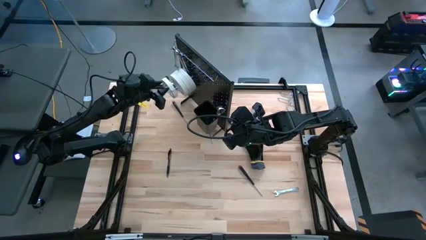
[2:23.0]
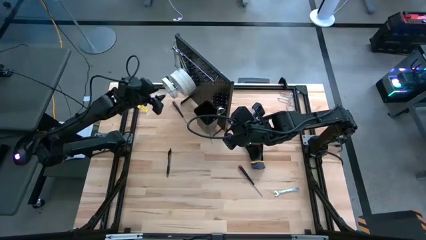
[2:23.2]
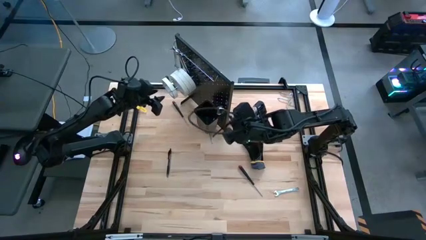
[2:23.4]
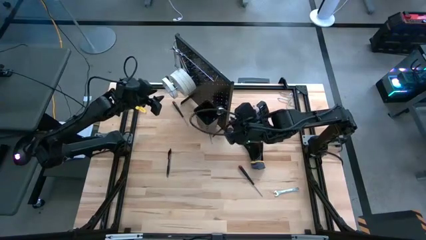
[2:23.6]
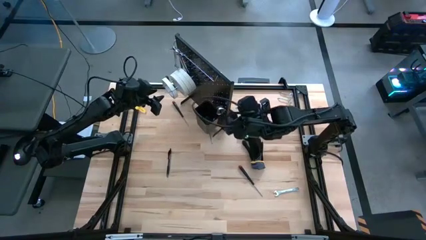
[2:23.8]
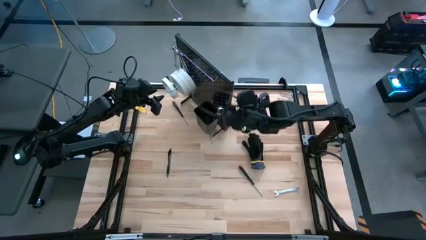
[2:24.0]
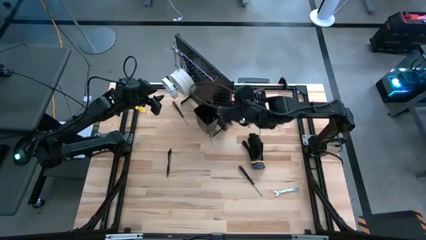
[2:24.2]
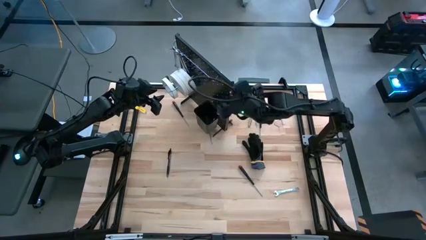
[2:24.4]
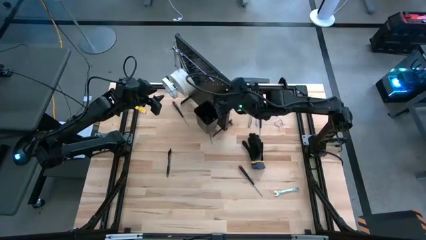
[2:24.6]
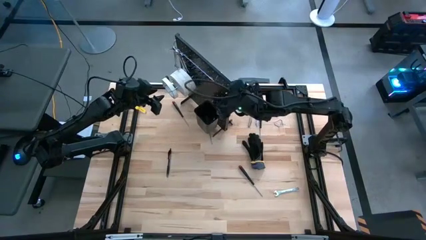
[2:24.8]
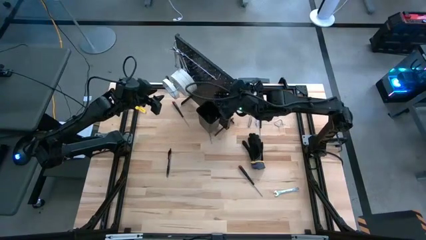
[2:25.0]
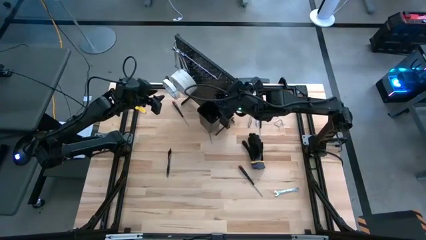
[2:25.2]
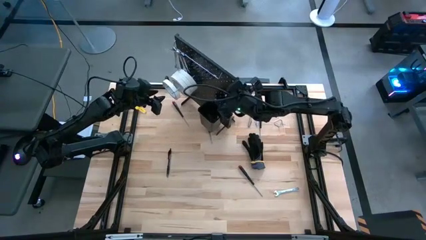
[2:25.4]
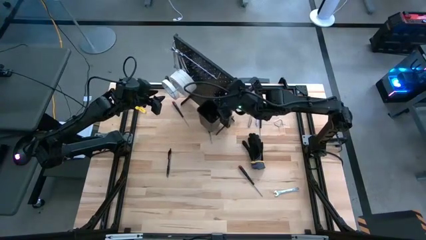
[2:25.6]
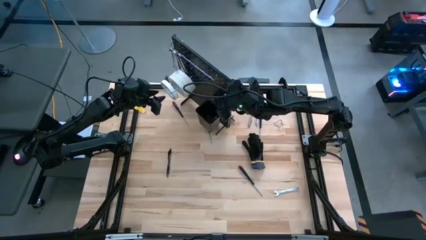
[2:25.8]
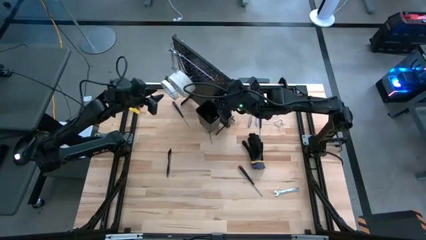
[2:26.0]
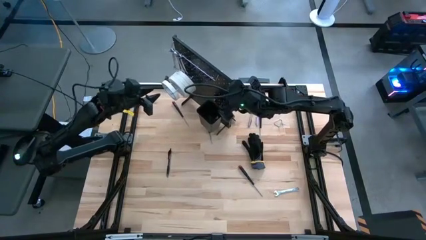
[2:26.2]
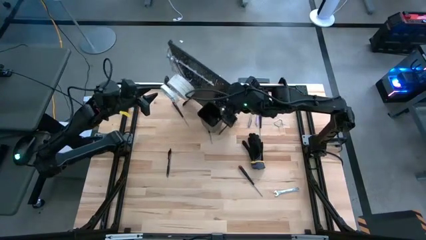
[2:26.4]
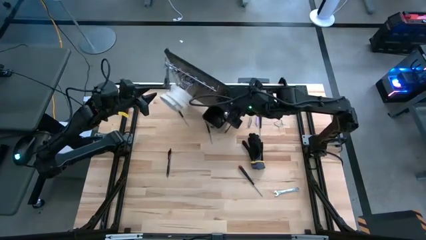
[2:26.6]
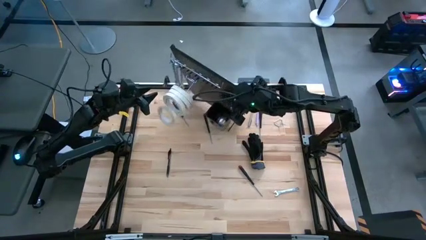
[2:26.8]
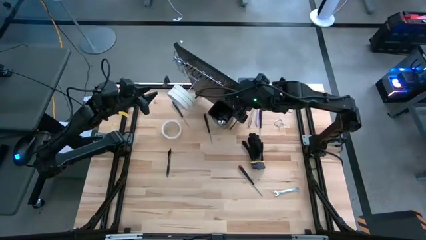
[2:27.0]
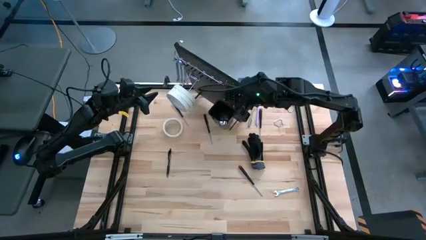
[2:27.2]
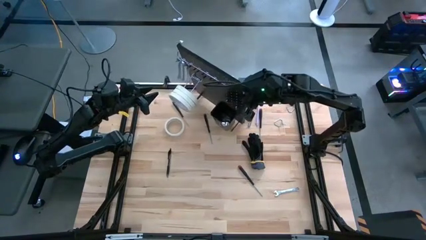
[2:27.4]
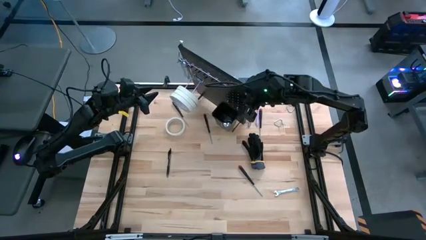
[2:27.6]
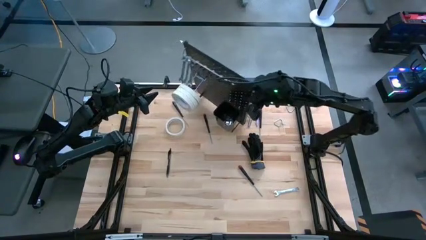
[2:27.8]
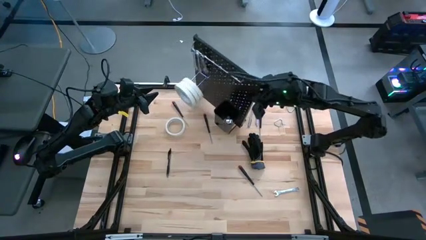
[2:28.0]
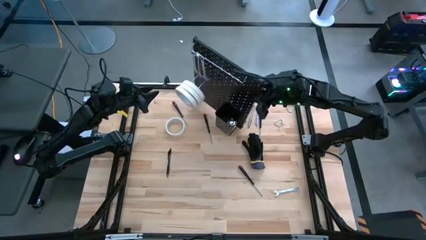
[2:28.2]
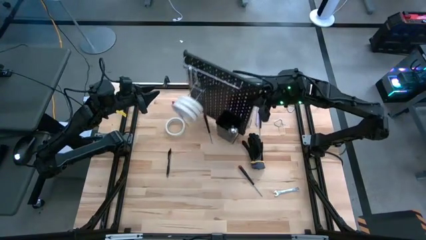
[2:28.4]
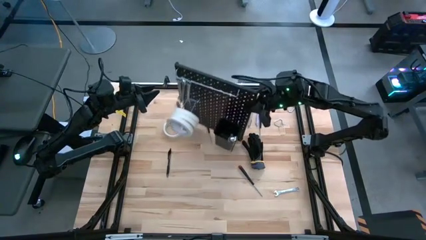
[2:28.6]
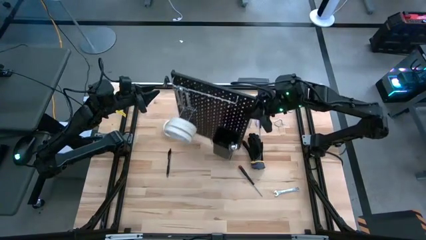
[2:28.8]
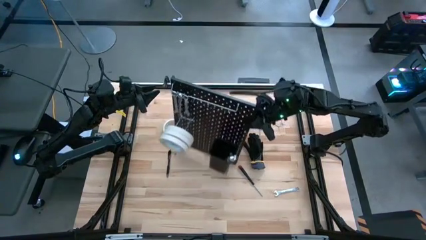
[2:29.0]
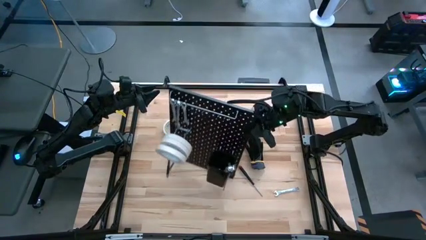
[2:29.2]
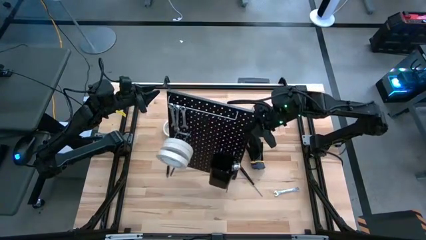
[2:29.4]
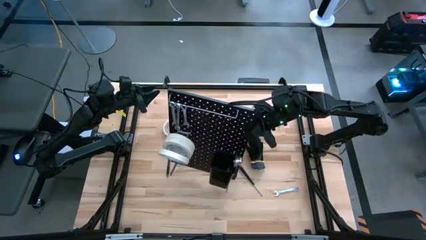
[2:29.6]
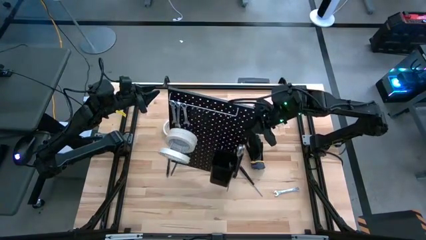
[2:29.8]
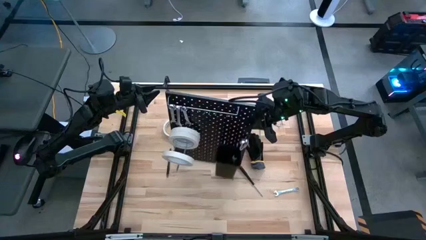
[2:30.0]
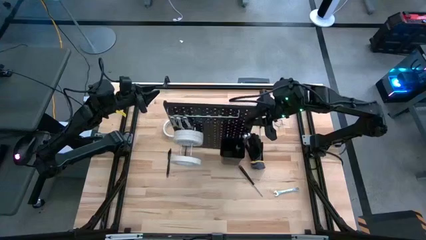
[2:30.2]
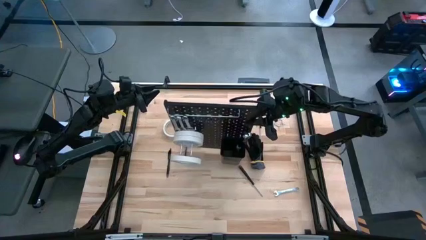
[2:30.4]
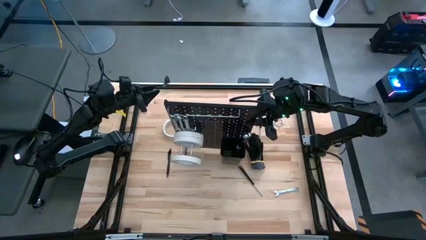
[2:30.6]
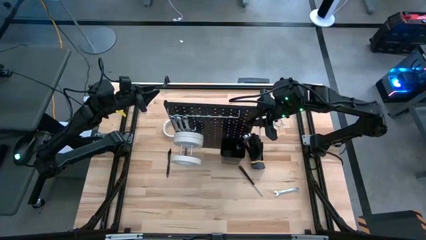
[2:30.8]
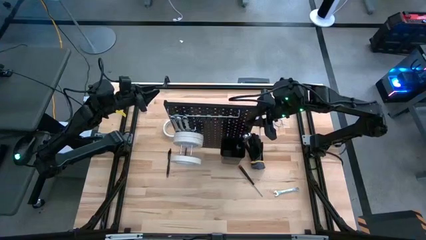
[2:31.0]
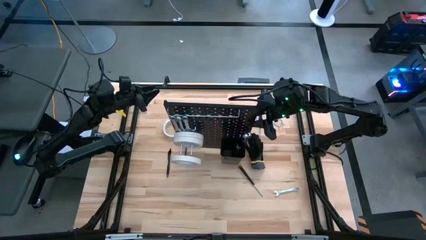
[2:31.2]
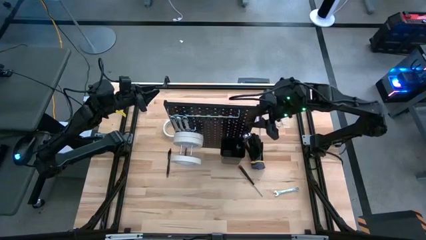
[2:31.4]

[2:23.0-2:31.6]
Task: Hang tools onto peg board
Move the pegboard to the middle

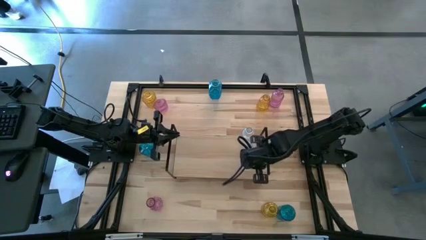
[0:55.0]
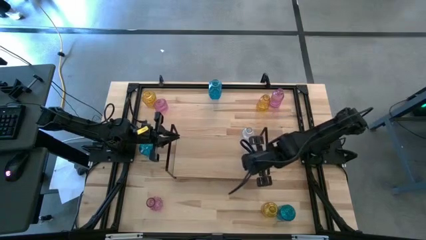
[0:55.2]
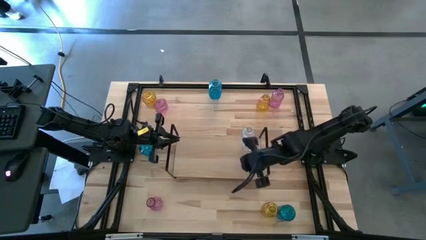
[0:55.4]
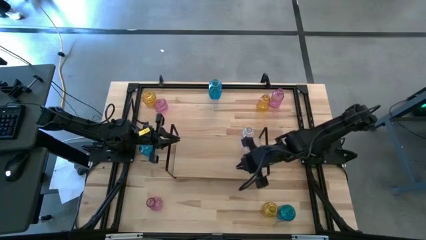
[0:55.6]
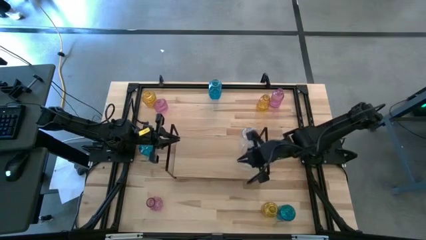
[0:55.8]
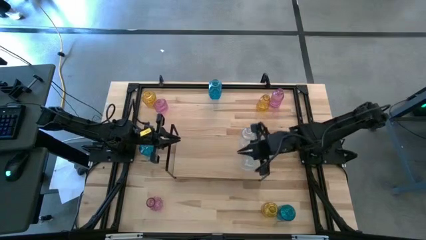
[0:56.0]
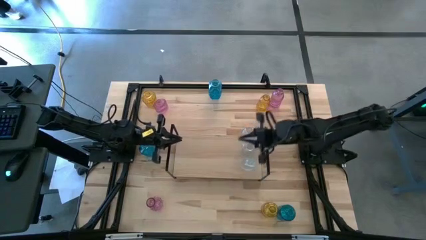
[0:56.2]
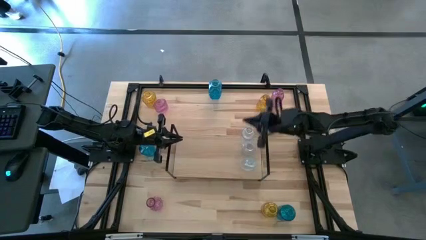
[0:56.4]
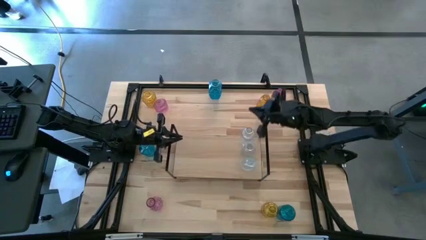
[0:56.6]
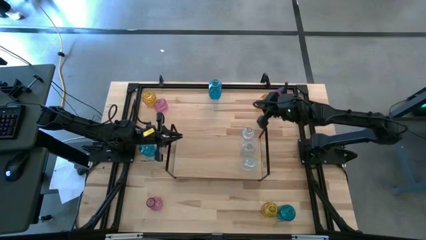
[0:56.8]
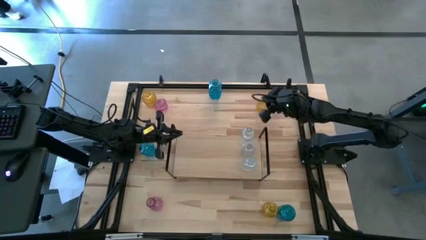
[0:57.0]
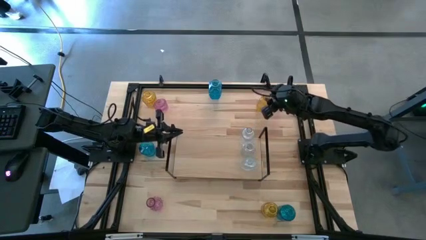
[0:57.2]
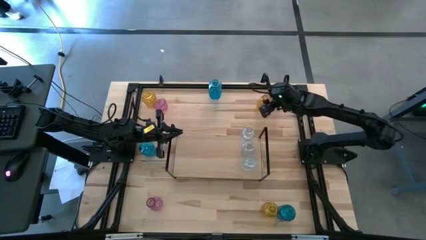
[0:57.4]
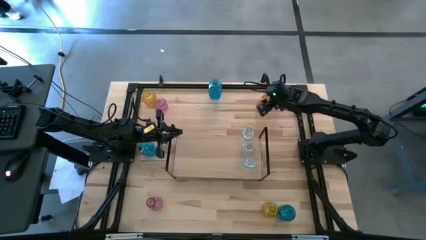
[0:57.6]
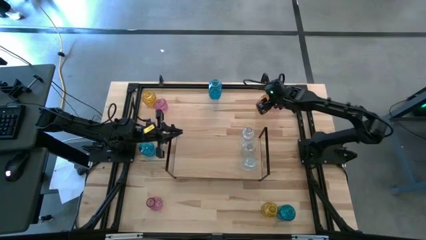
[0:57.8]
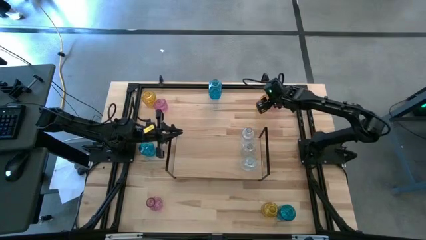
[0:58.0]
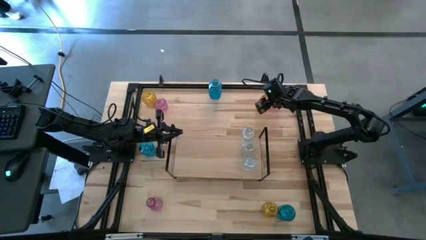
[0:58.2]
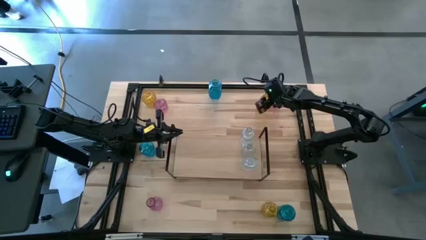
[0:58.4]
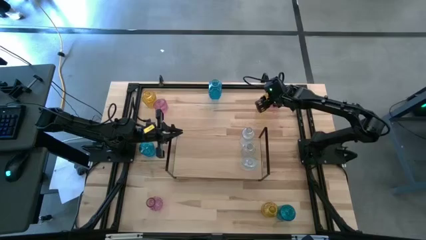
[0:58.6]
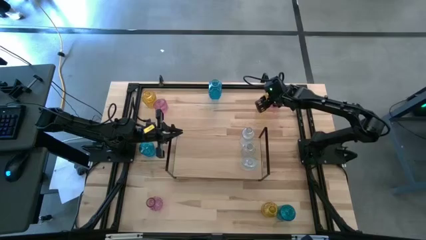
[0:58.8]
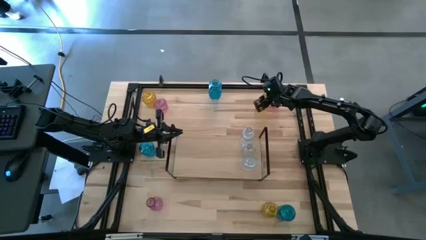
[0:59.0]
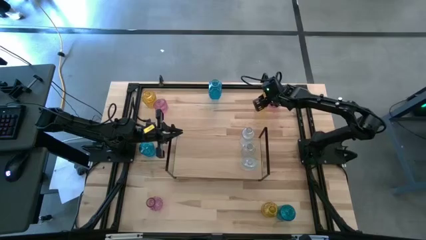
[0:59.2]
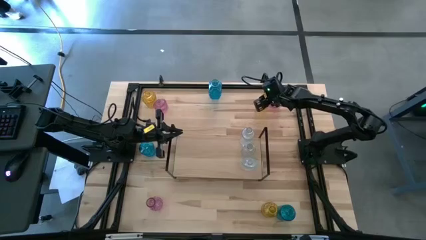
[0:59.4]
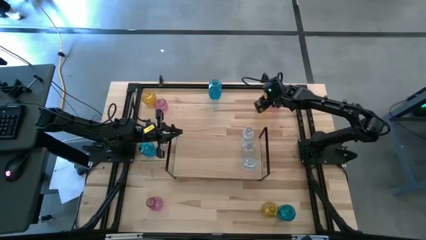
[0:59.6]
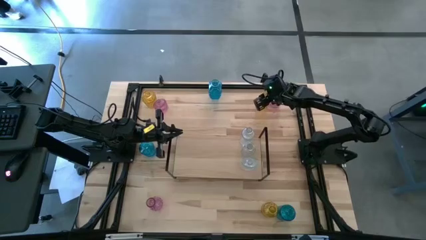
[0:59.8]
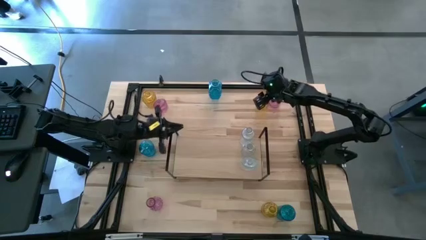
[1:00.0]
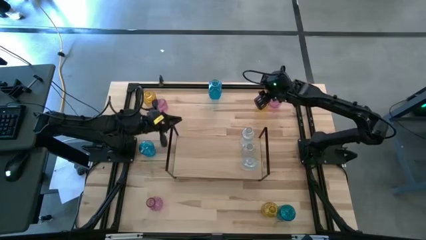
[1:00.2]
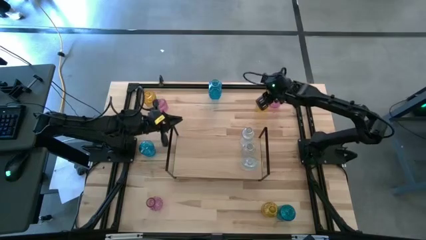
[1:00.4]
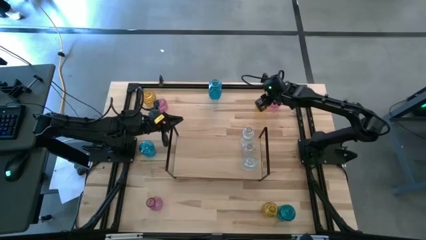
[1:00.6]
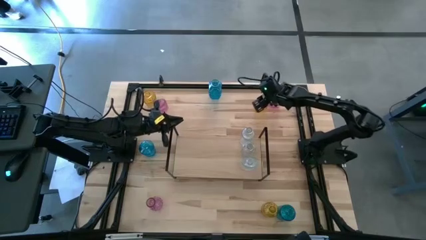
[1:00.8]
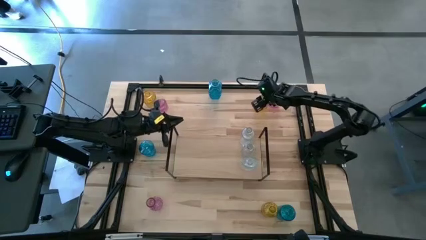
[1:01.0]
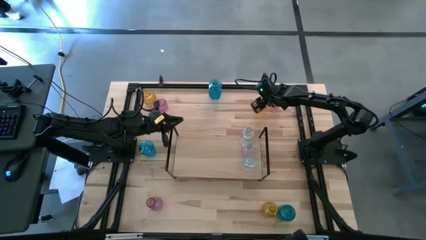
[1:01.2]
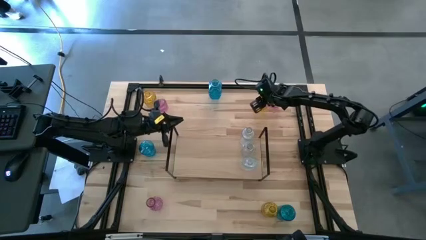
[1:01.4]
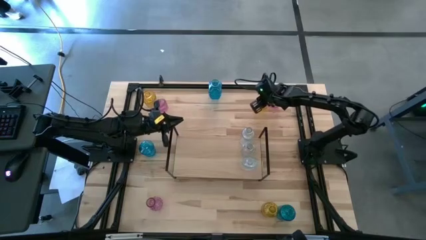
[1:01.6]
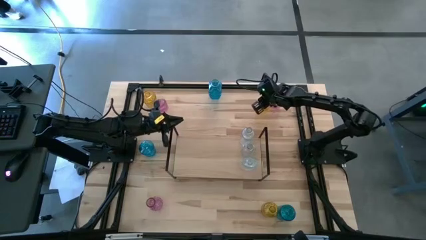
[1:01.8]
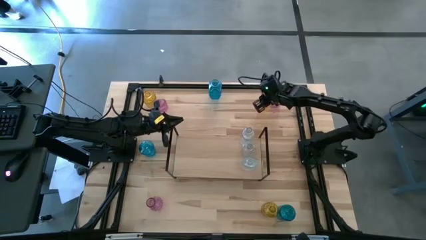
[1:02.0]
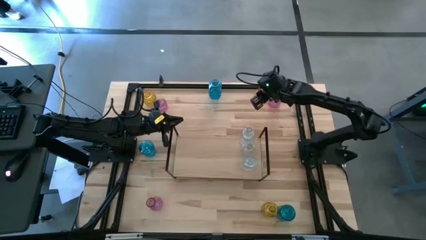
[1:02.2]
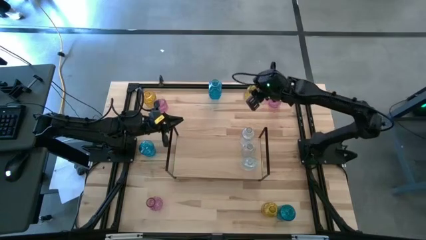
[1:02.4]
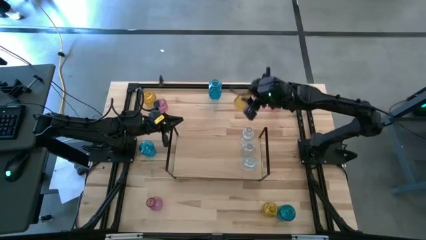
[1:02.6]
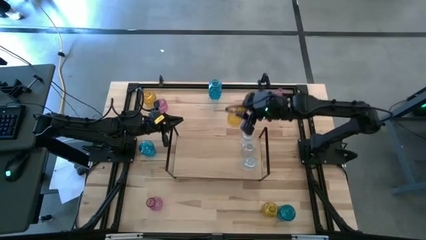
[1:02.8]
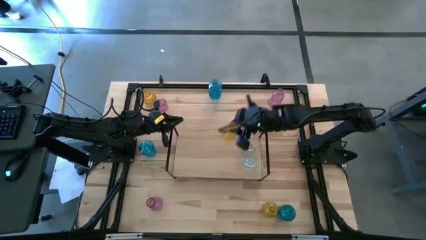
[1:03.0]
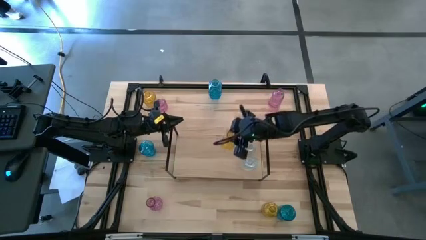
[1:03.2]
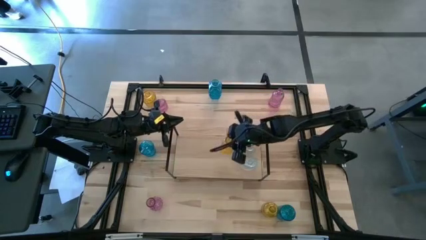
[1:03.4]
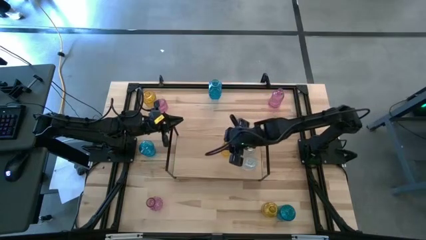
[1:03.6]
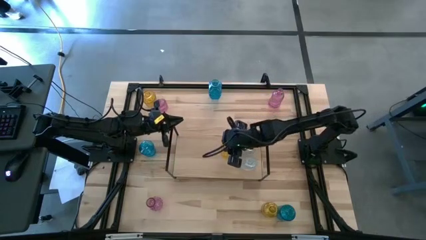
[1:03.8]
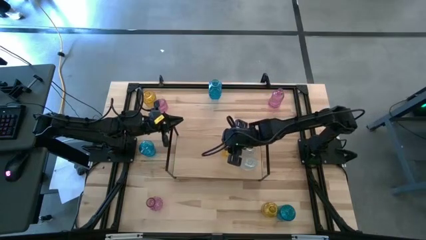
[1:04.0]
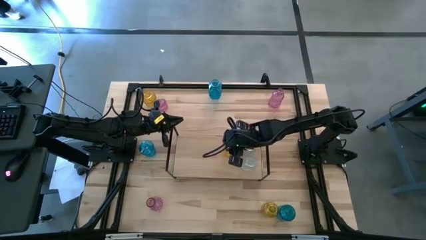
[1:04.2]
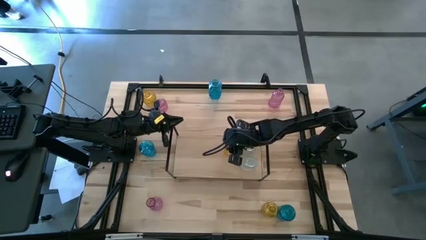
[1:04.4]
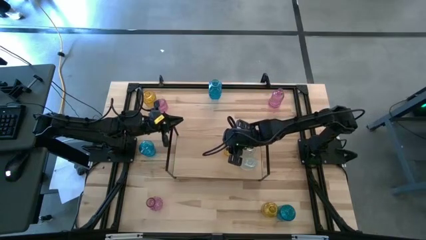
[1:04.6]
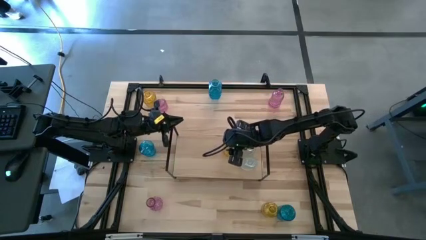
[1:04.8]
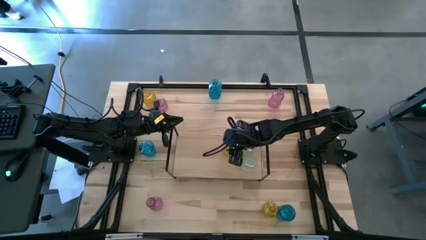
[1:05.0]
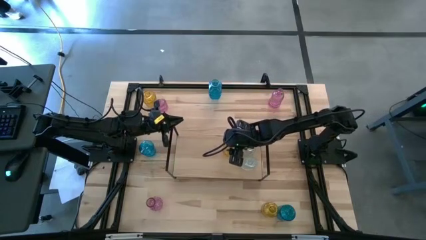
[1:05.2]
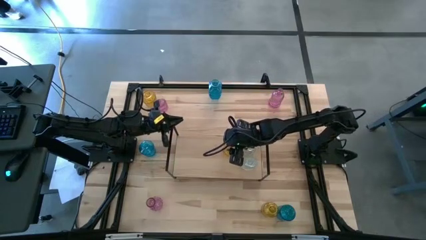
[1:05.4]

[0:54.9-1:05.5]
Task: sort vases onto shelf
Put the top right yellow vase on the shelf
